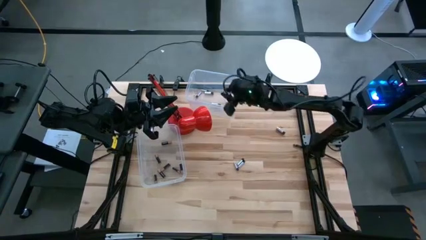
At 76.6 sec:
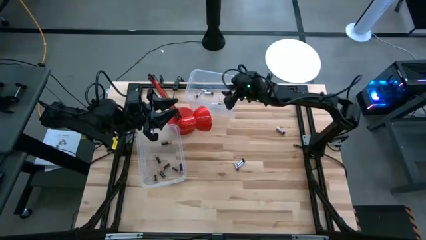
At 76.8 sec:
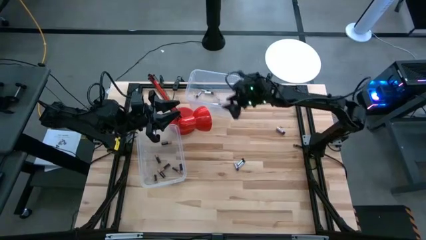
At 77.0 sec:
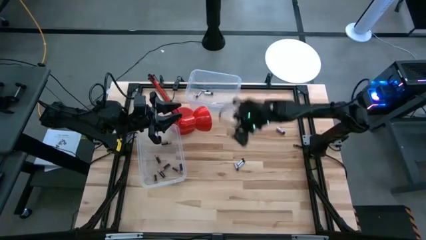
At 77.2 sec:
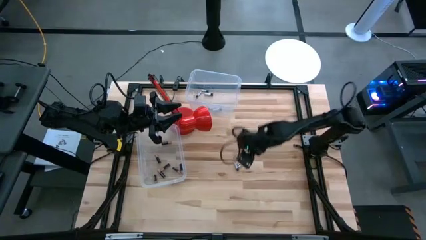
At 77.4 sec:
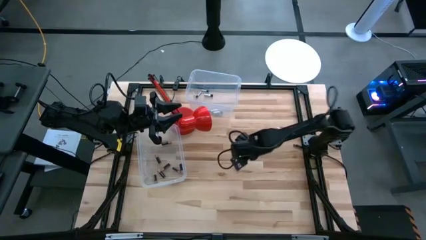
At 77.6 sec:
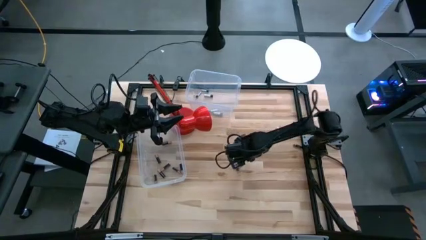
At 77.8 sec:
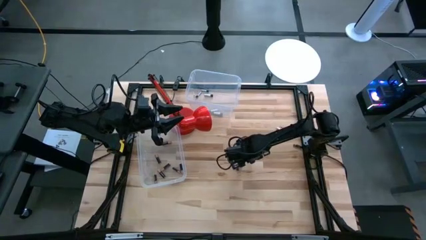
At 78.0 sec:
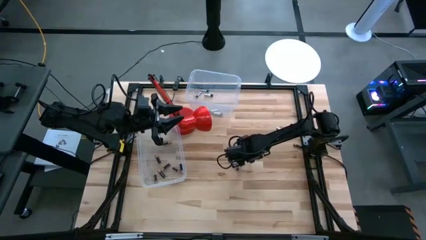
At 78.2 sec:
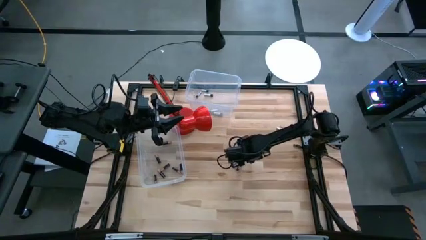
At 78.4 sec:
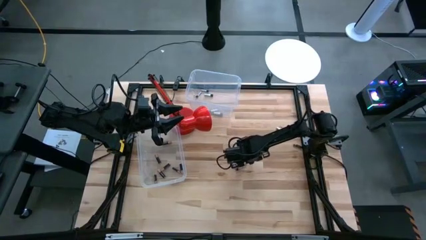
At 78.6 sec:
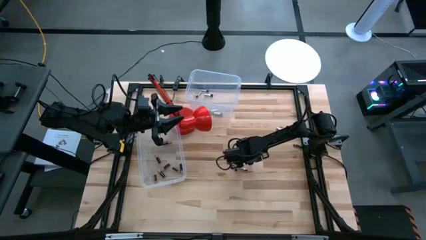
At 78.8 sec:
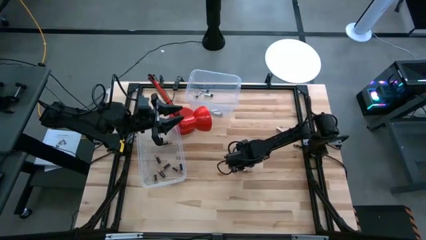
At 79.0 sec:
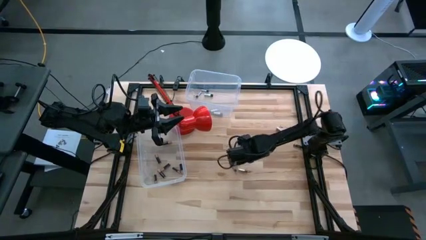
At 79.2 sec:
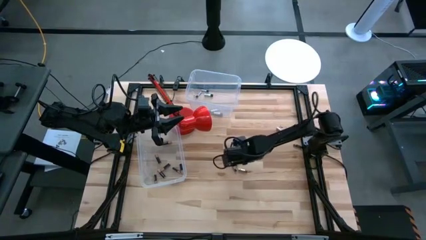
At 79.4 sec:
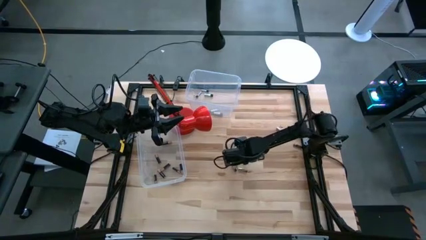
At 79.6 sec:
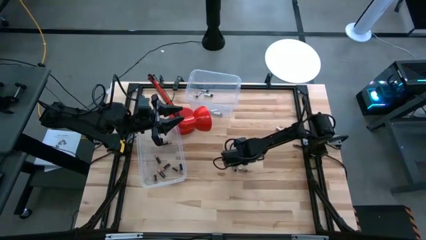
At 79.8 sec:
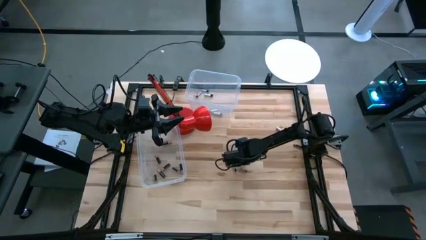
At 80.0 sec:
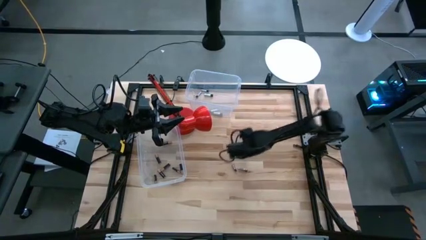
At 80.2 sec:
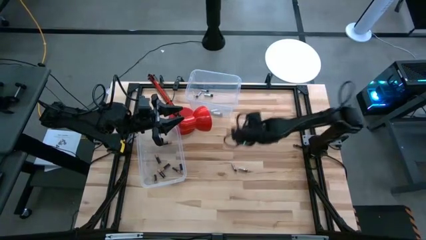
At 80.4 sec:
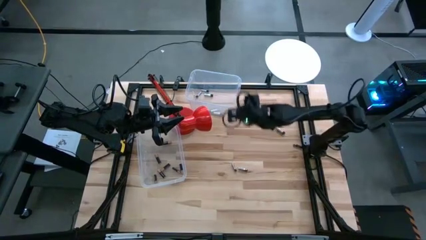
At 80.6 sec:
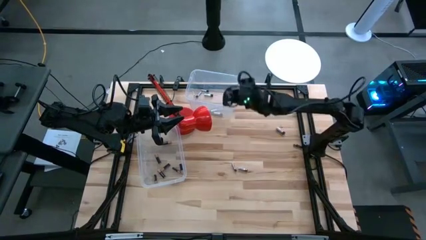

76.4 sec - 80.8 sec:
Task: Sort batteries
Put the white battery into the top transparent bin

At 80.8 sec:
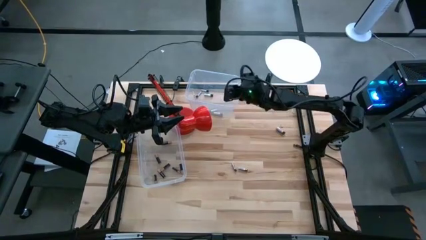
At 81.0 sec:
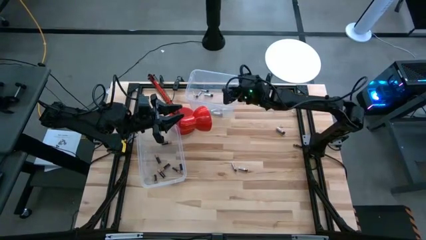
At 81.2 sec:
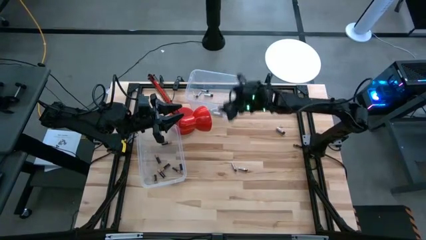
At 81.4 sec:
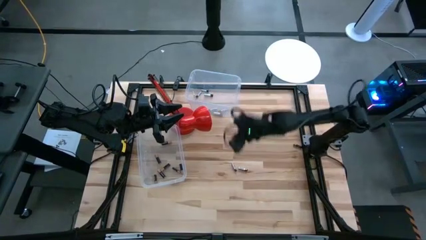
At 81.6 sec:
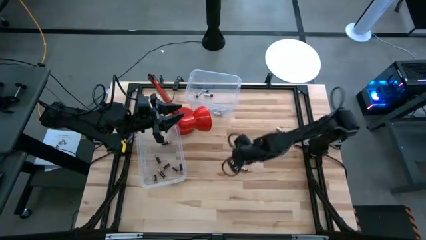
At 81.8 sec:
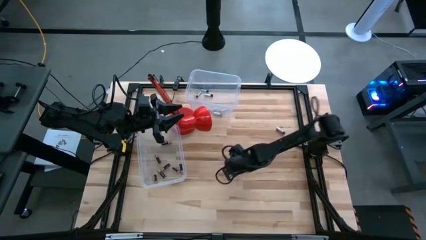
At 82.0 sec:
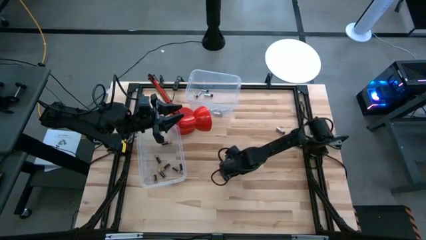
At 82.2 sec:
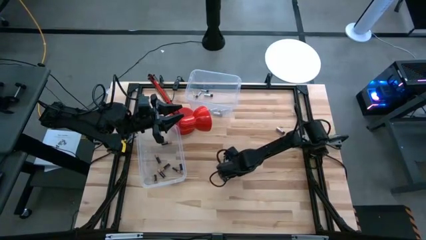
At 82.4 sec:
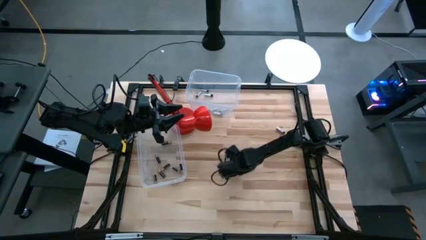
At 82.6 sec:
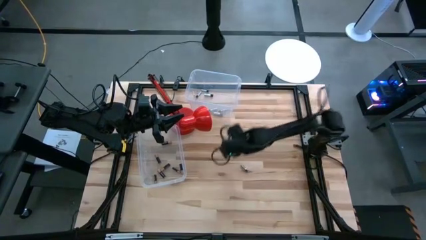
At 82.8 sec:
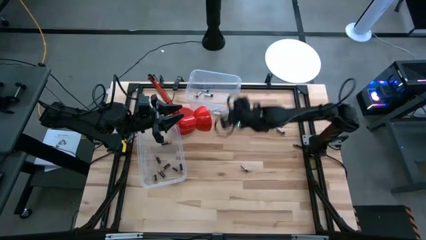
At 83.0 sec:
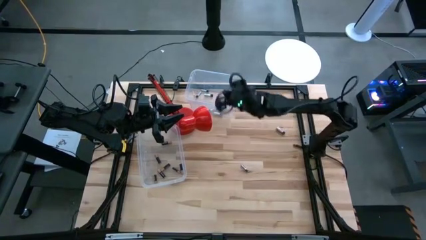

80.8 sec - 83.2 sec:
Put the white battery into the top transparent bin

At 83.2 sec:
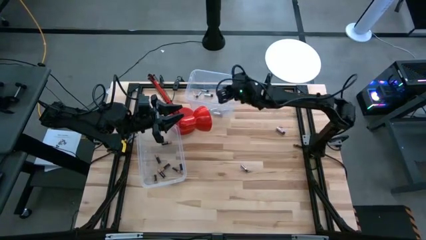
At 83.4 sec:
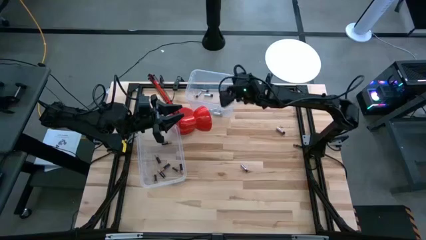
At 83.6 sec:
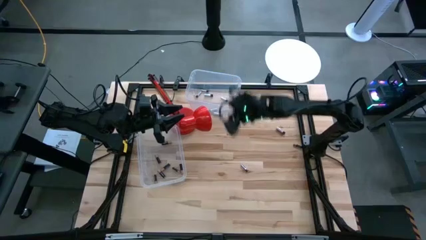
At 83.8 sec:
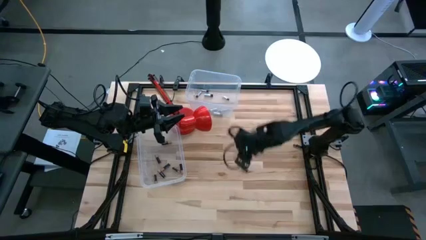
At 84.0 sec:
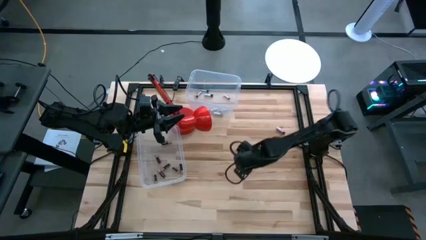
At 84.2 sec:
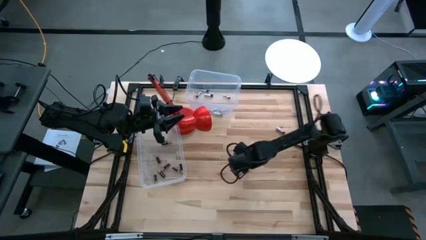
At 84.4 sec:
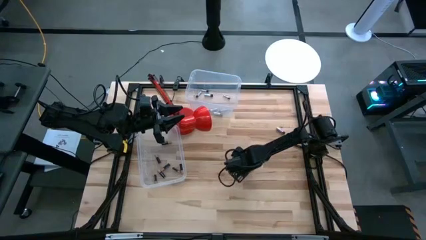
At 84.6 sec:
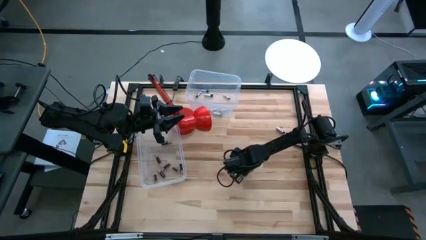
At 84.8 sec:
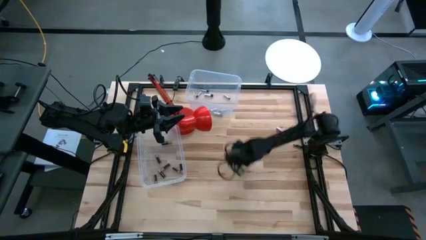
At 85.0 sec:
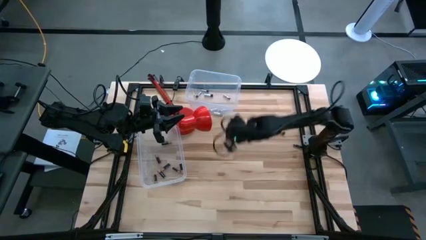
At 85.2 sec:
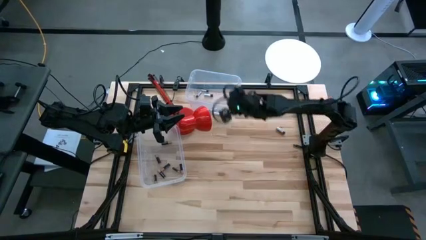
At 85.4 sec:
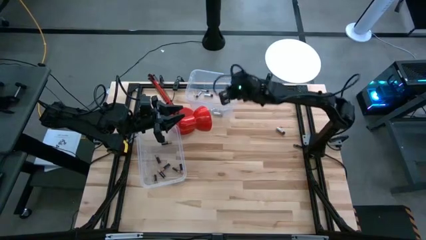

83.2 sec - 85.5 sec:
Put the white battery into the top transparent bin

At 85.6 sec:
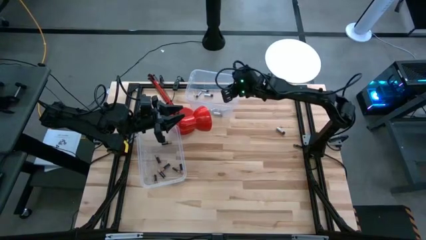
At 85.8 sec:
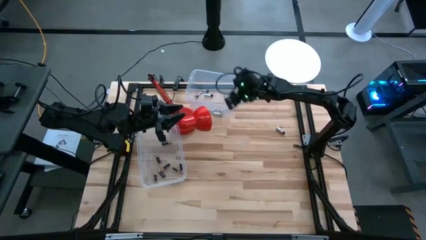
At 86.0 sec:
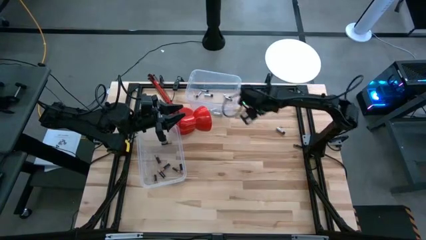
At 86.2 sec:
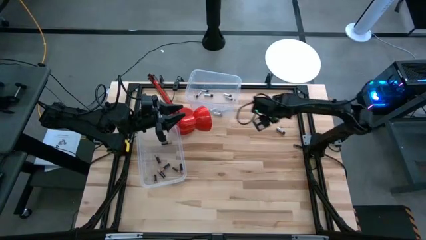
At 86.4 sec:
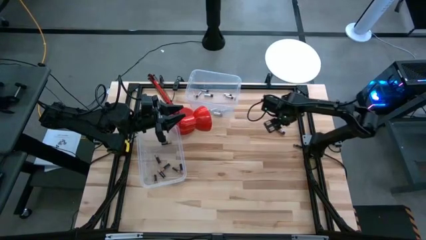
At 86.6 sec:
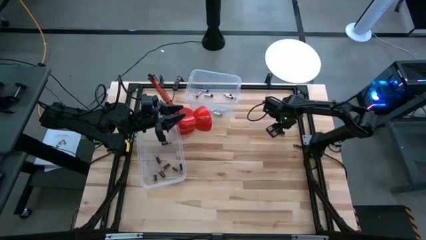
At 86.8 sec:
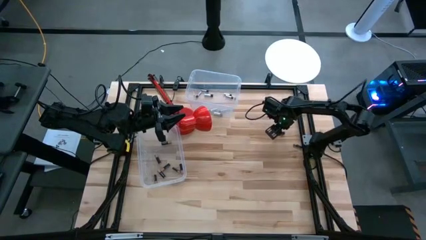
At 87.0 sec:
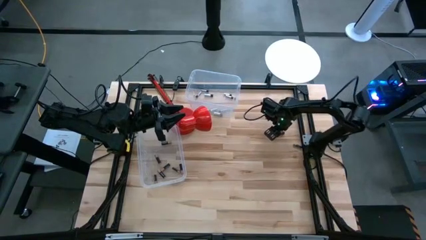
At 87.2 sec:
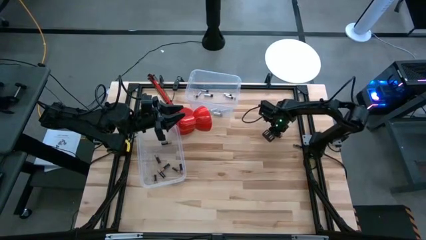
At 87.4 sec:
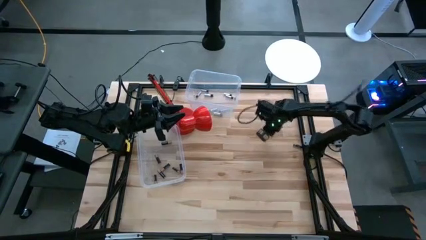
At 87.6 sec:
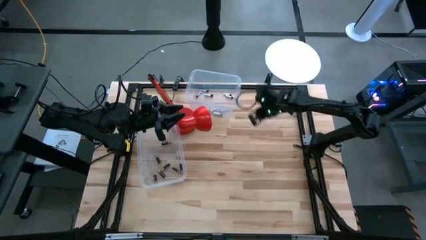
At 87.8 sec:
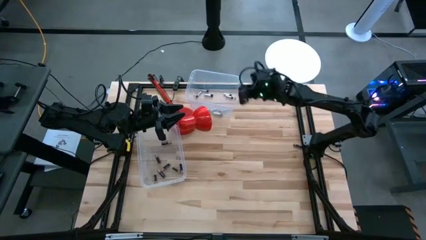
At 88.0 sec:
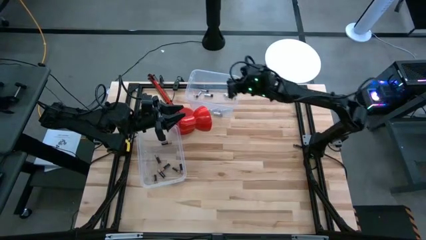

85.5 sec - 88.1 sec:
Put the white battery into the top transparent bin

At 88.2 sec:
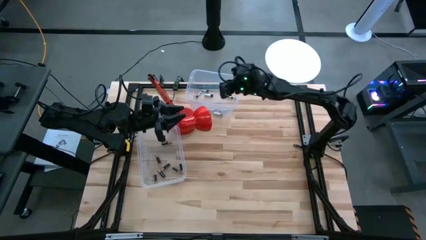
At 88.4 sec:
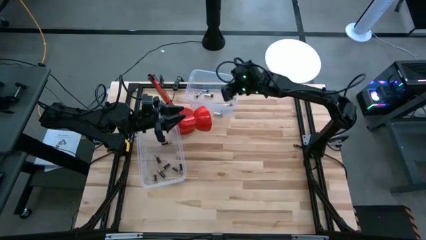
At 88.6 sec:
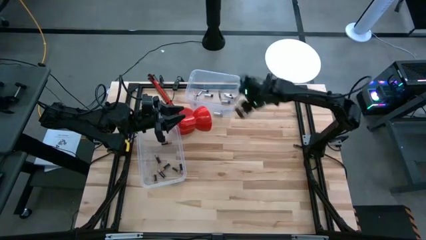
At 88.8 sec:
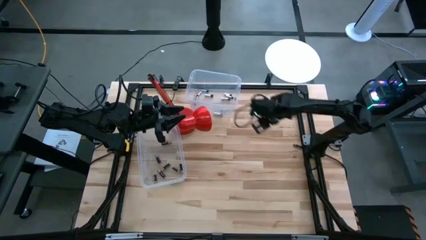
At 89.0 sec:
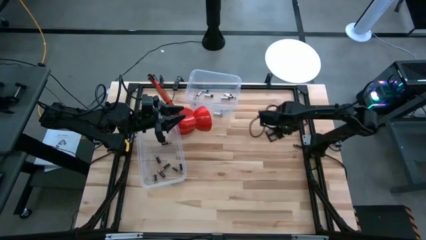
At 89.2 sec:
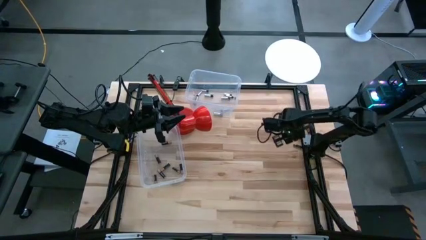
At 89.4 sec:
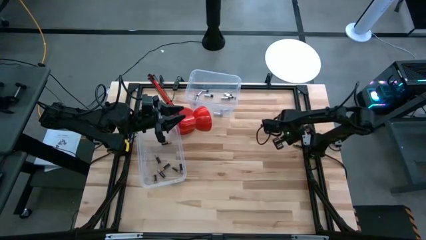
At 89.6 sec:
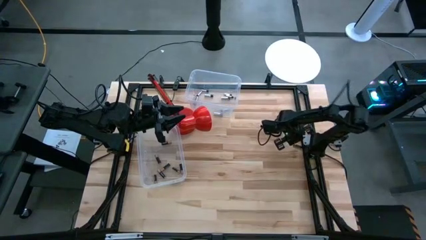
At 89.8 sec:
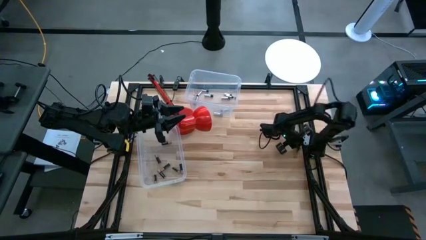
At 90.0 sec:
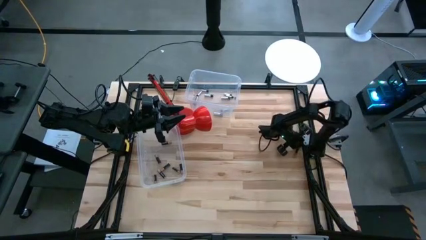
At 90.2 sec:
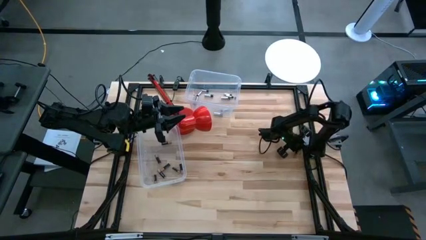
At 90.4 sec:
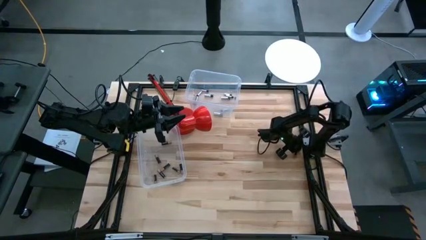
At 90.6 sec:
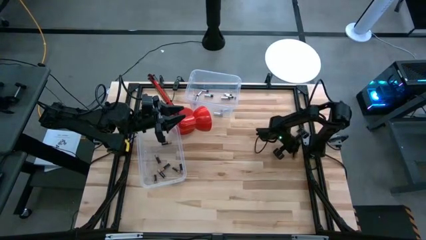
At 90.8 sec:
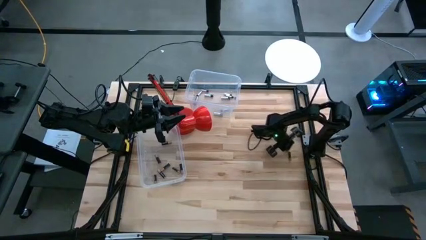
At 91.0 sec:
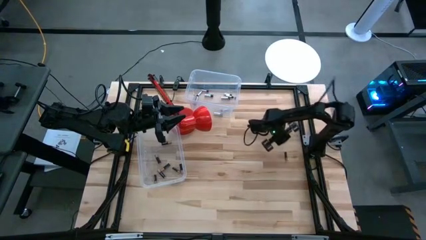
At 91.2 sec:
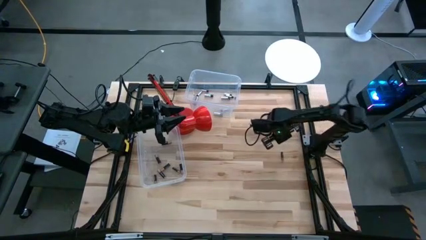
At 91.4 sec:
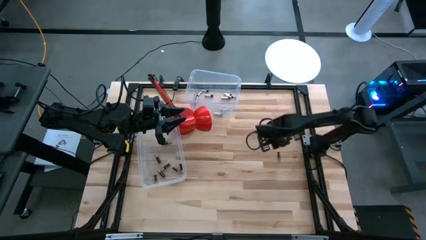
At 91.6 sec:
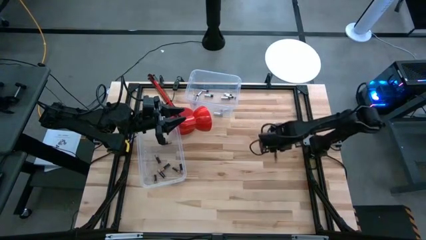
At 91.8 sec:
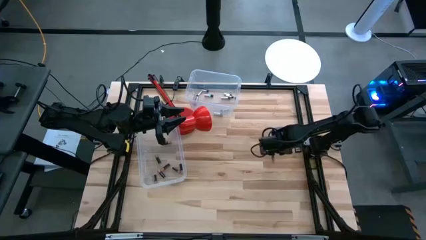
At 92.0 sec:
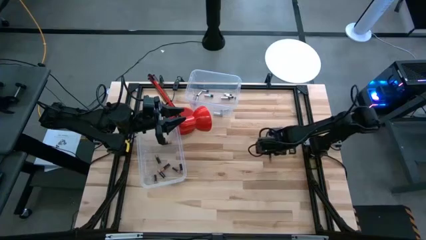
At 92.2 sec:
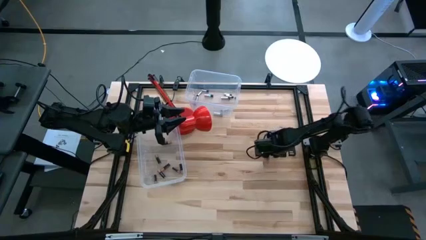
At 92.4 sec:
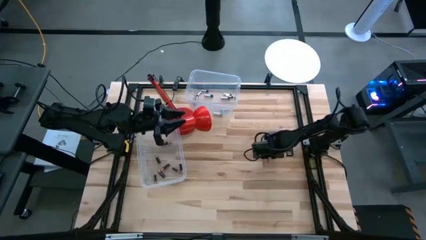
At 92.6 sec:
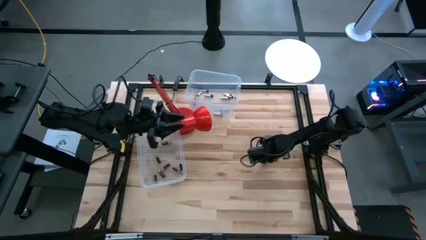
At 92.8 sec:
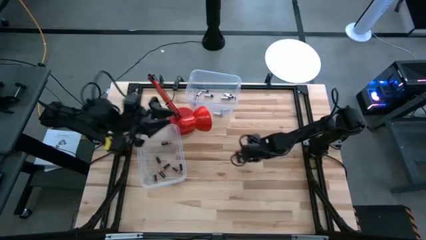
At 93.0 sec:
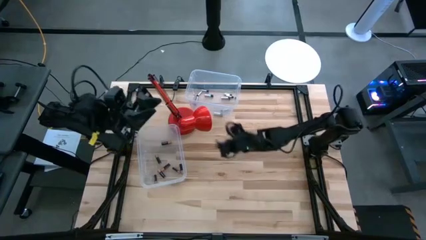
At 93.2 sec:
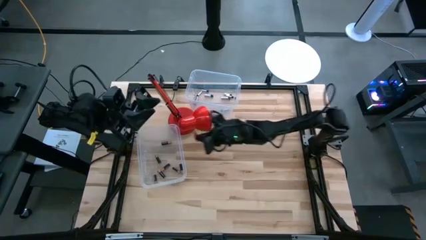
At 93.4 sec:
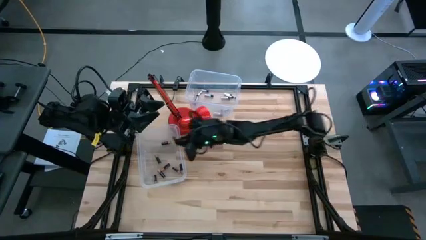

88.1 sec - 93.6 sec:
Put the black battery into the bottom transparent bin
